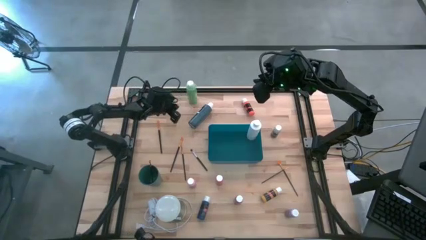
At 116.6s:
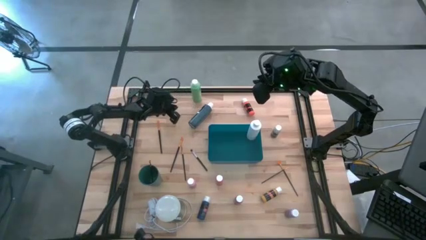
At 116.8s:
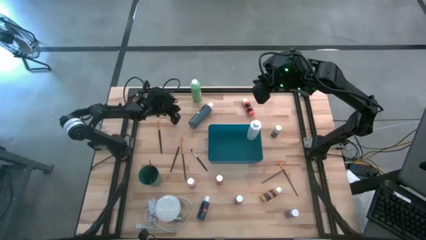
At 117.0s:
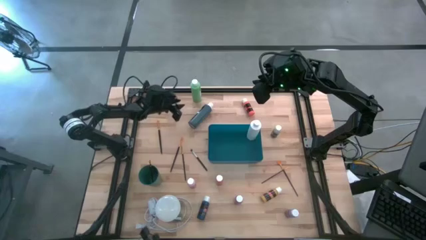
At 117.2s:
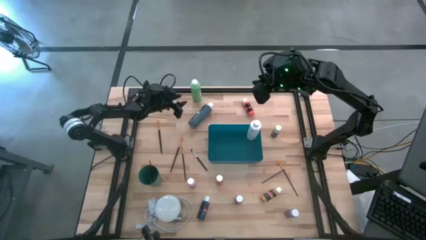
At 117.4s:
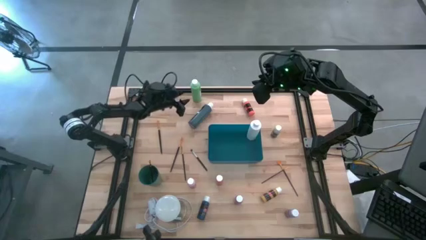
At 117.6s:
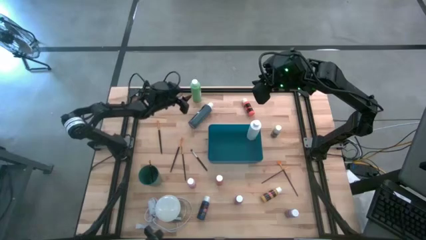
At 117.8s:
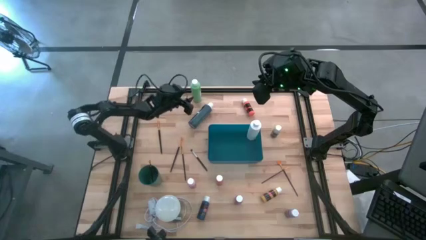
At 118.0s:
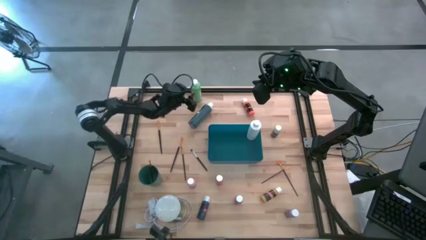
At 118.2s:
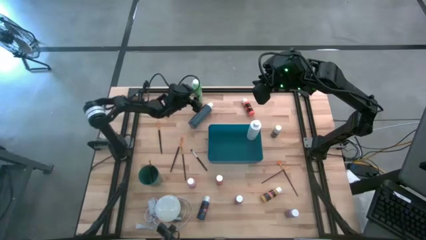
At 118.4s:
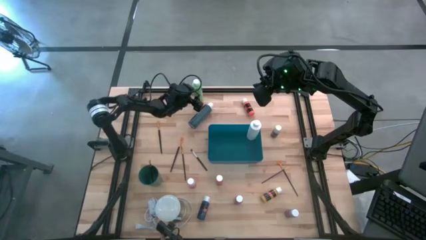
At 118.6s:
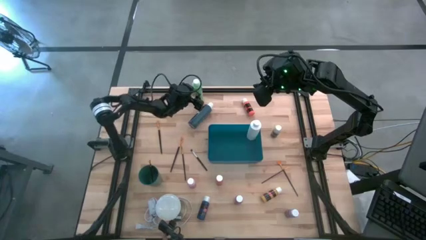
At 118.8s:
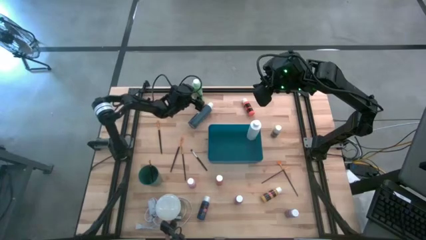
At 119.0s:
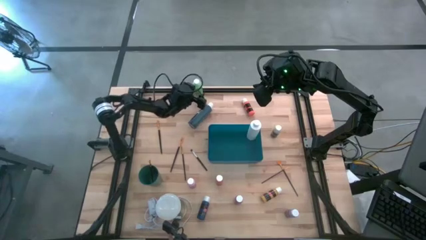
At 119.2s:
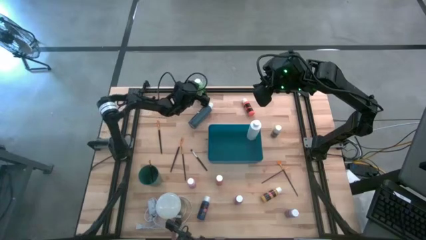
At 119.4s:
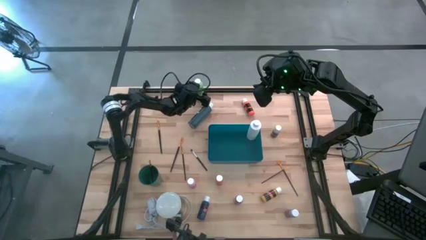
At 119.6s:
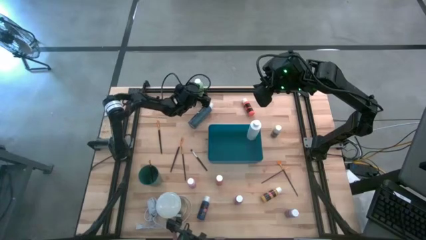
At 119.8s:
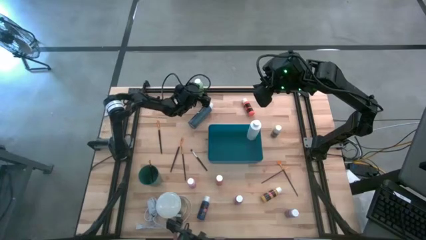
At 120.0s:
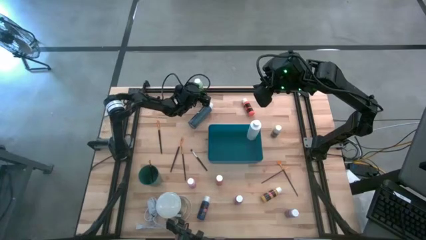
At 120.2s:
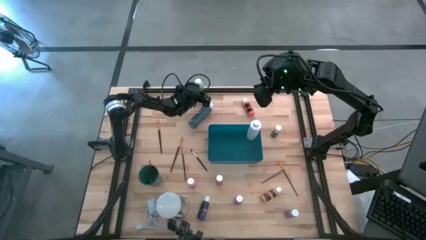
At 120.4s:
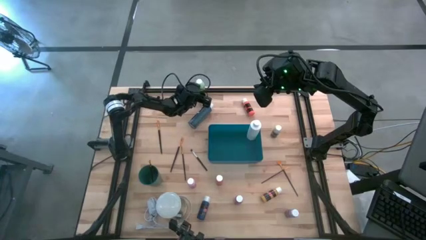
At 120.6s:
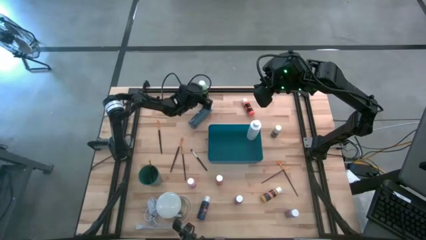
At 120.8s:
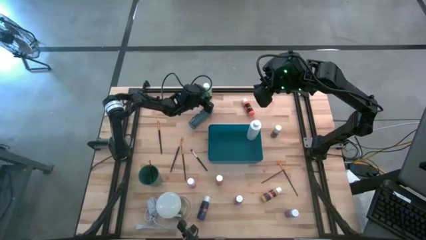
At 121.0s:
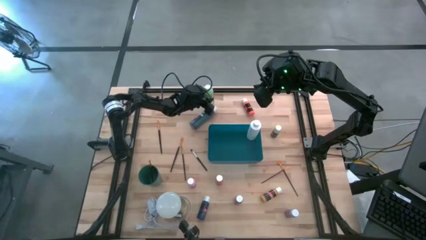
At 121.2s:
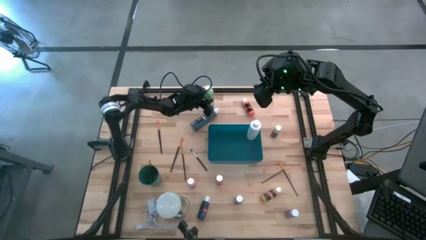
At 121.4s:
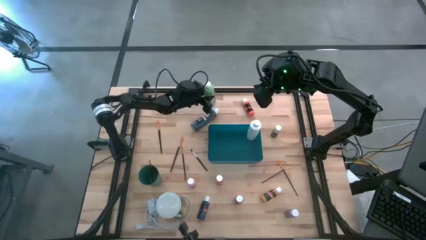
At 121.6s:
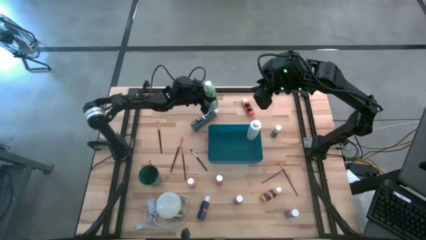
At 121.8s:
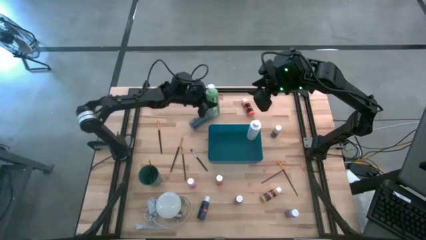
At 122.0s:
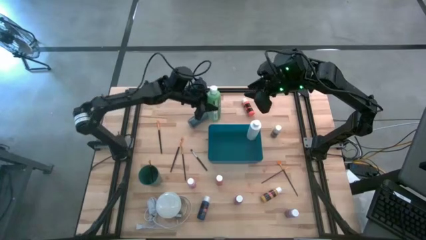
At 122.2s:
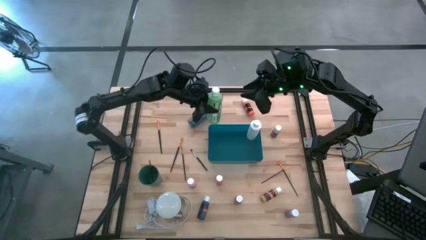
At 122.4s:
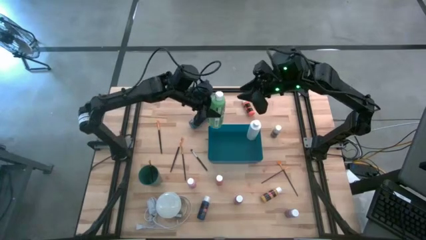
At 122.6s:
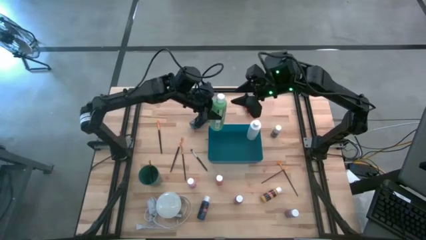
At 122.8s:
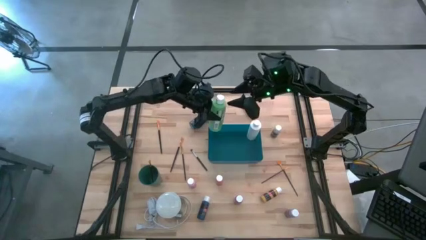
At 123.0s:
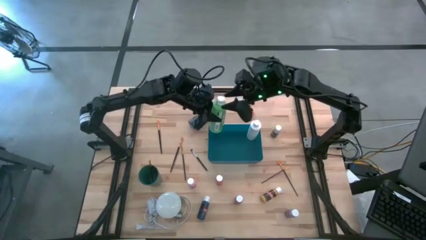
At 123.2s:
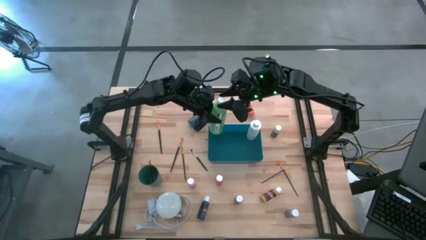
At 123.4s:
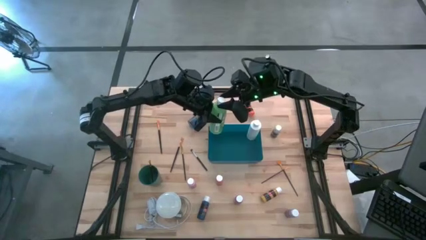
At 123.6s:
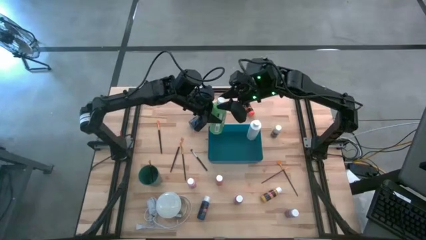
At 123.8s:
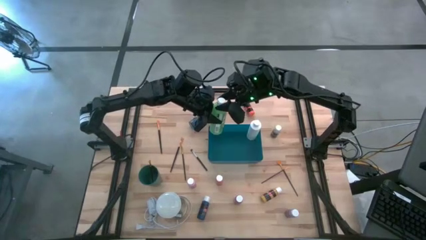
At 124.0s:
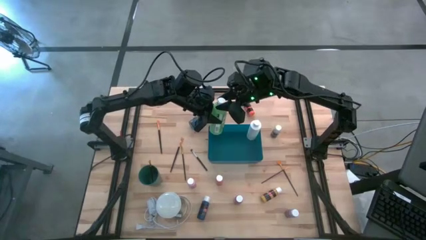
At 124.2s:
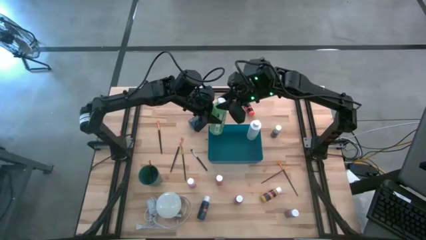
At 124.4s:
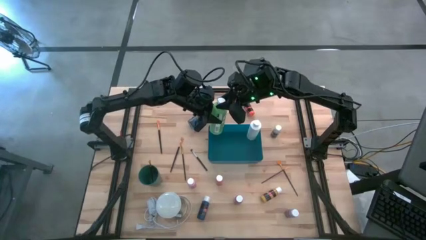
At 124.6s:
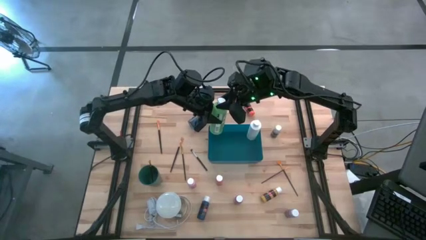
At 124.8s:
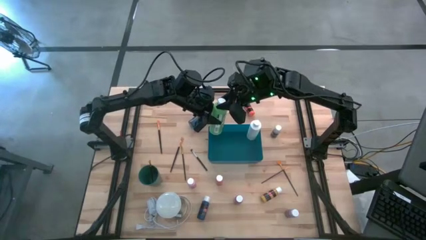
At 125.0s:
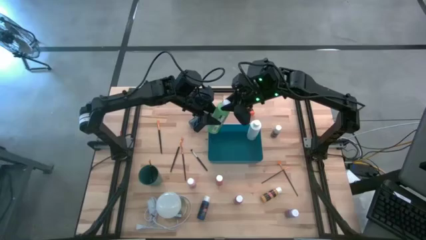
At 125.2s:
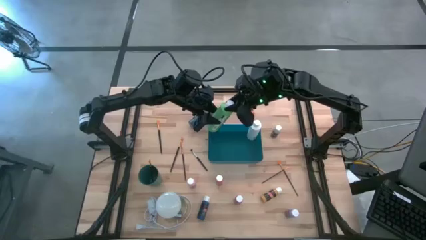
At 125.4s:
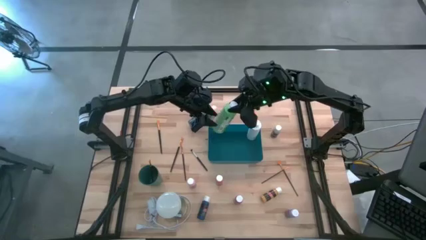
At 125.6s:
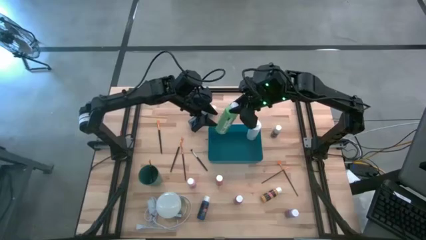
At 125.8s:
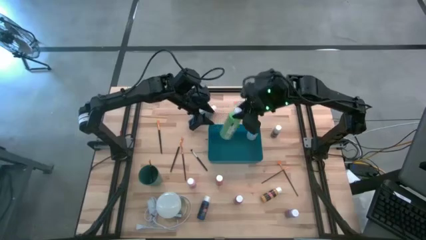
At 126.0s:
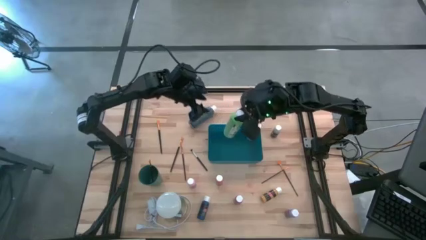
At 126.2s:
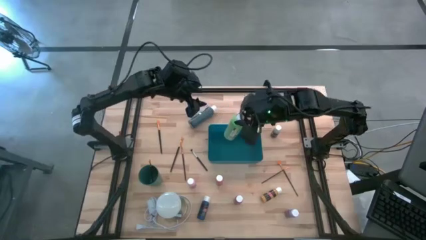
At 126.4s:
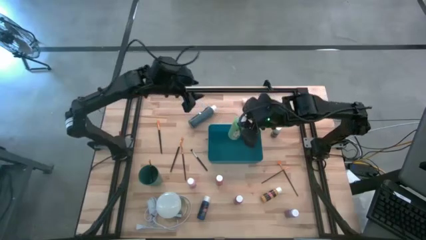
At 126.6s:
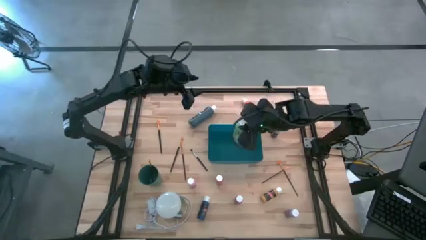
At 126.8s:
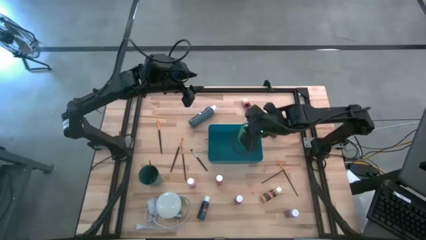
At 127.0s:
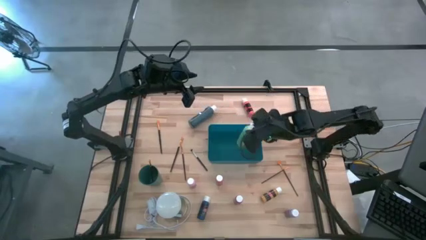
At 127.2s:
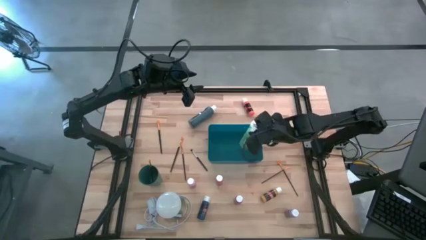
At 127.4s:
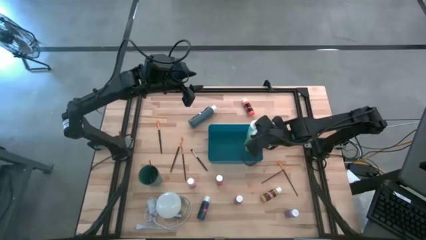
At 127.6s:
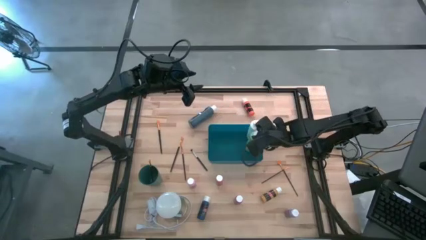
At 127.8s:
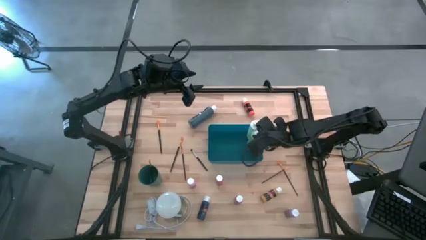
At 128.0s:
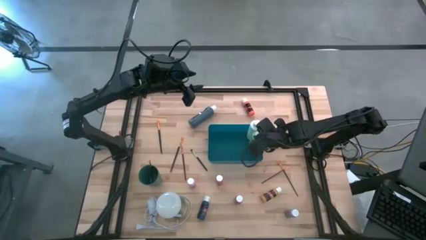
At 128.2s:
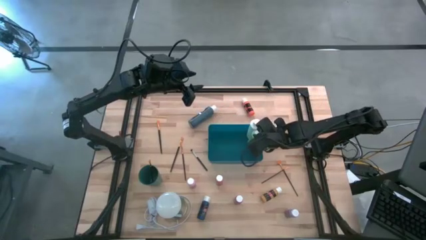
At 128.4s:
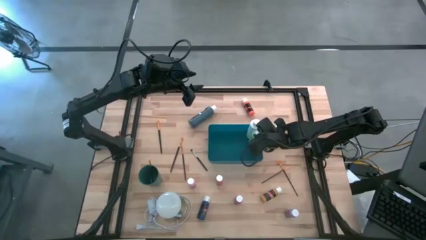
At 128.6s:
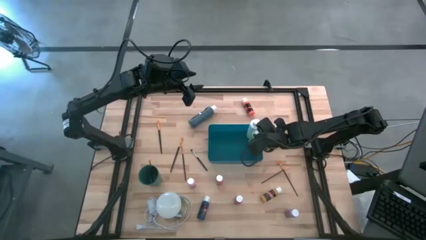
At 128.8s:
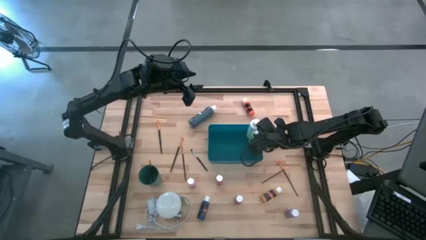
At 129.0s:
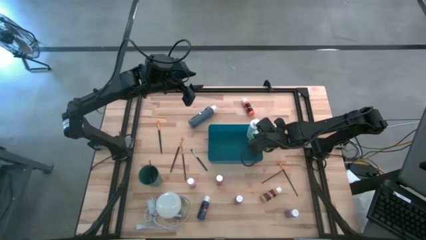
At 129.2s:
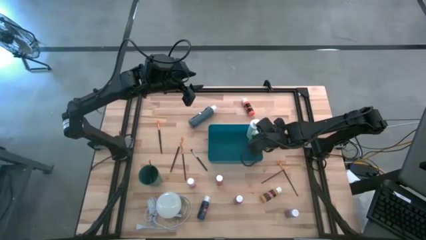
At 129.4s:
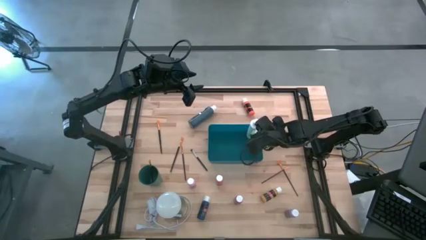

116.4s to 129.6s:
Task: Pick & Place Paint Supplies
Put the green paint bottle into the blue bin

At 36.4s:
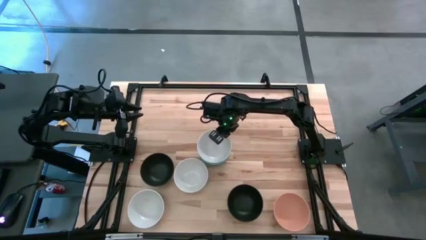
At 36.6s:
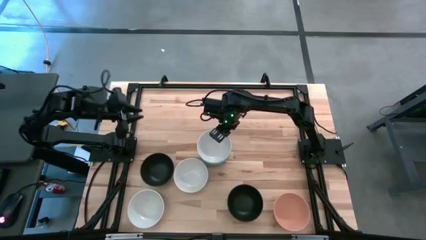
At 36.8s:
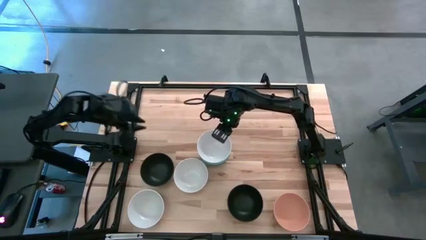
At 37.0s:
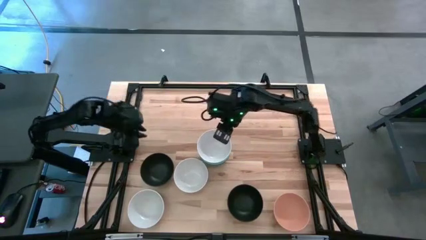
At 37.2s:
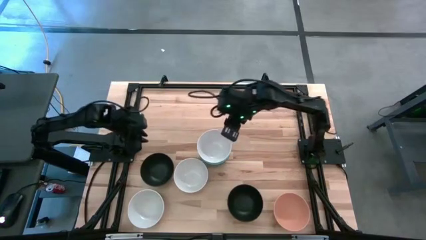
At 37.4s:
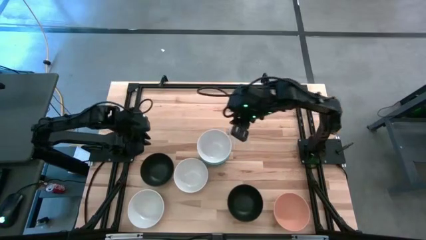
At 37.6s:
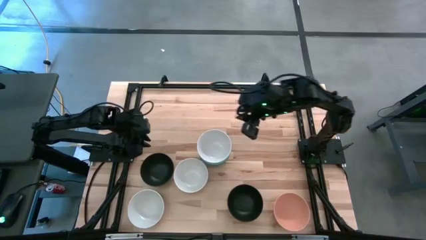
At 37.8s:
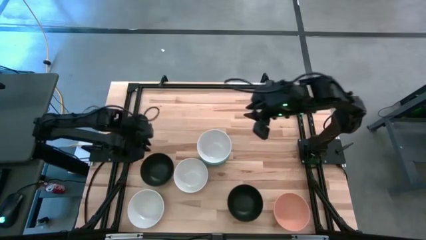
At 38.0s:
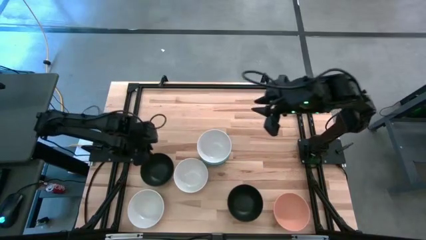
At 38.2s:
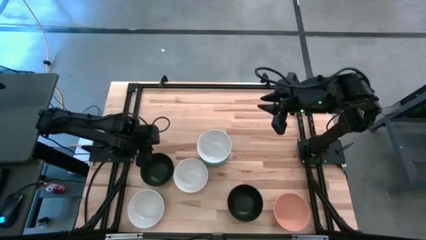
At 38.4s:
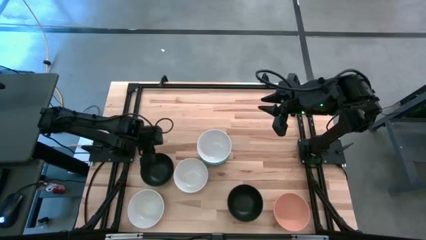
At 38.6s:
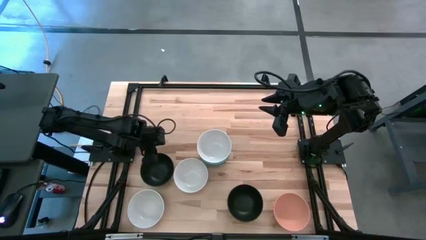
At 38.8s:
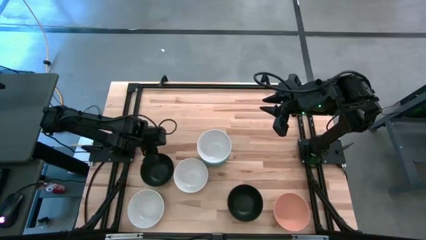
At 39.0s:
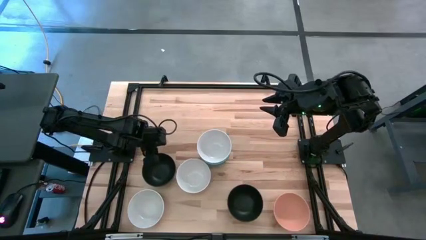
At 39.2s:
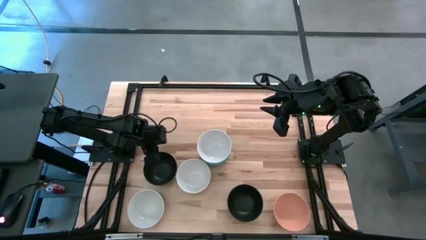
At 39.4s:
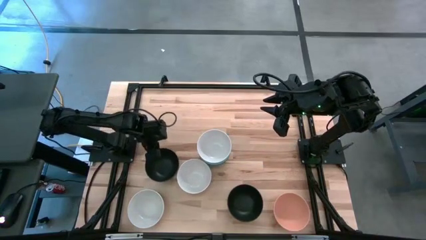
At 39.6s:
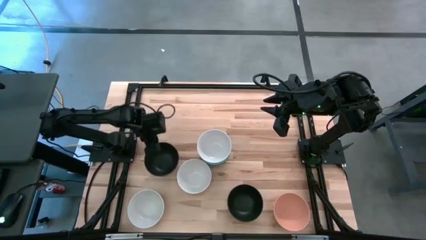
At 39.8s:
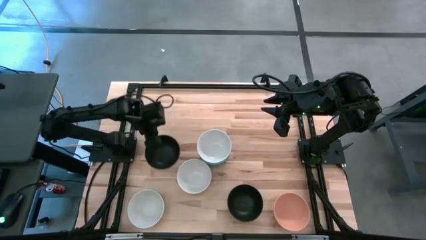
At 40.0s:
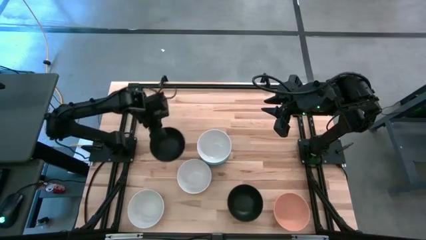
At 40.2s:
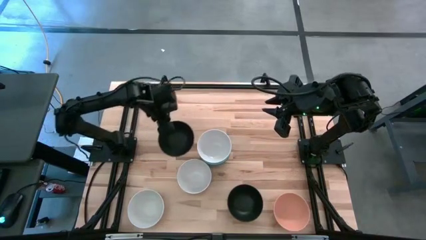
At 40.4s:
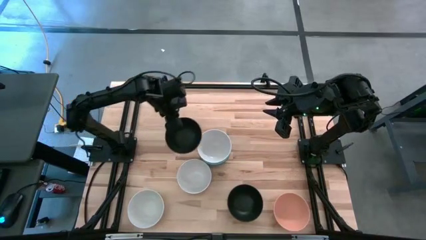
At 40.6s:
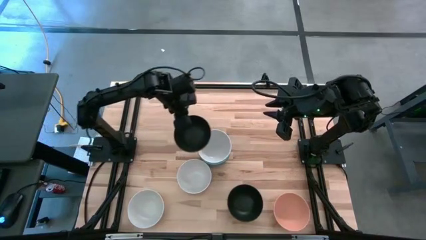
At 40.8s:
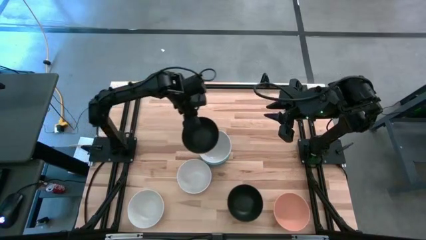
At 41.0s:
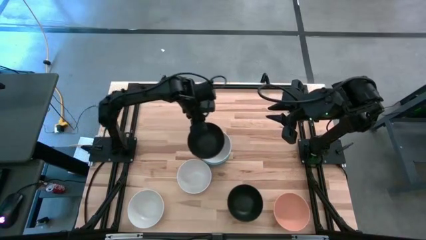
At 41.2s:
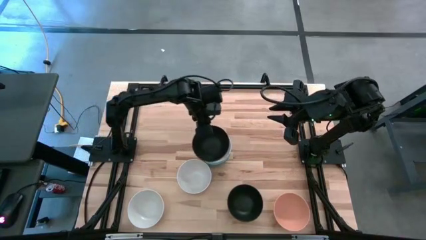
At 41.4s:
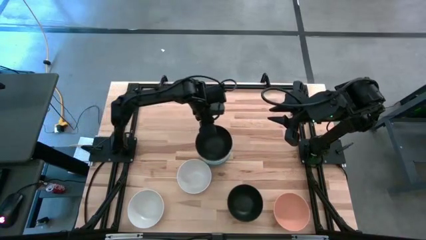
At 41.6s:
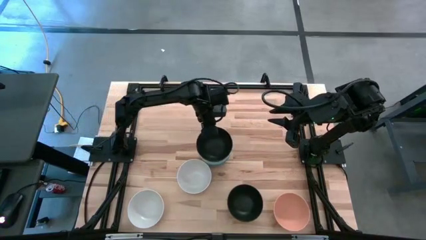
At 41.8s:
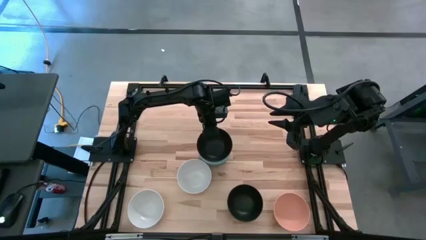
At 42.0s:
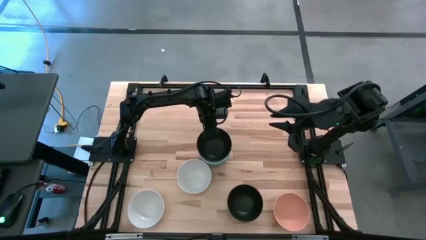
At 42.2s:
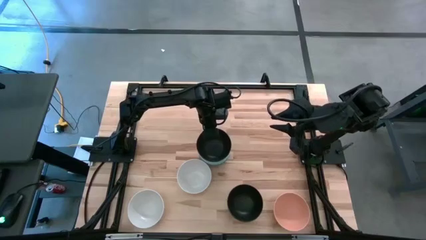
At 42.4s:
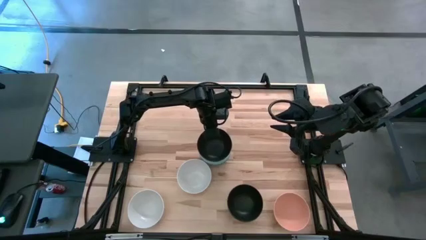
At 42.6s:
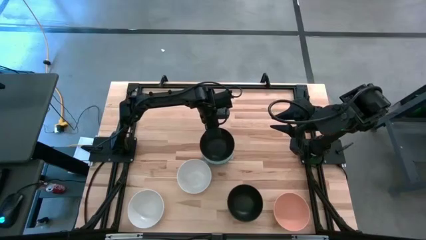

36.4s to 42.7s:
Task: Nest bowls inside each other
Stack the top black bowl on the white bowl
